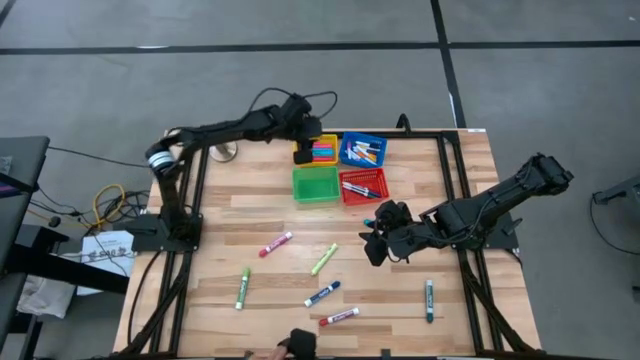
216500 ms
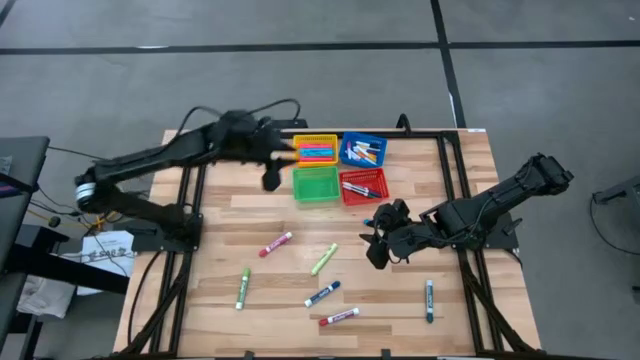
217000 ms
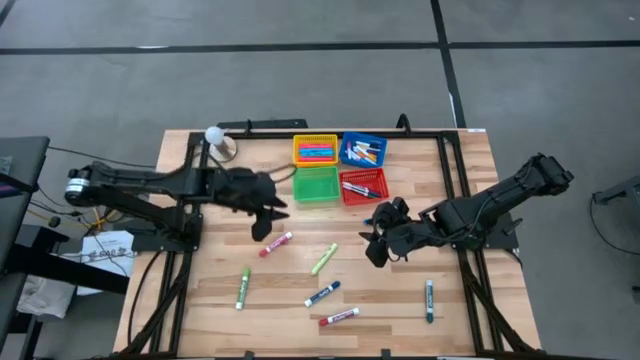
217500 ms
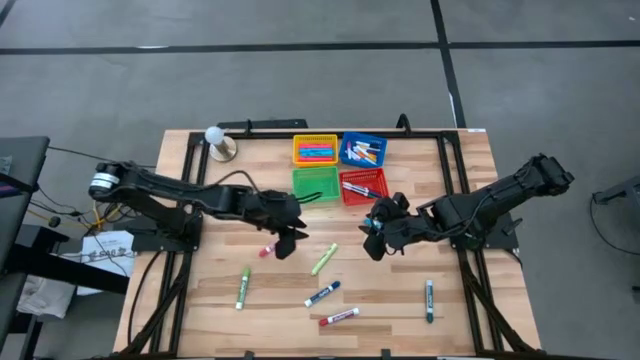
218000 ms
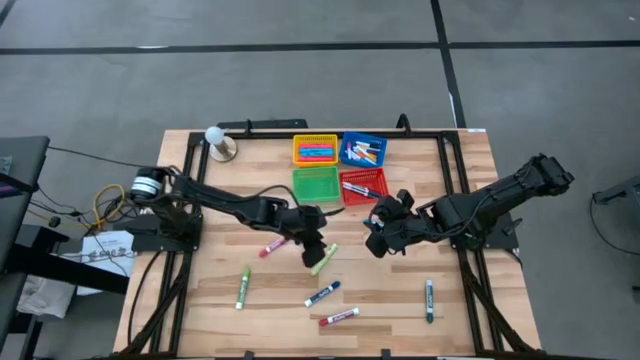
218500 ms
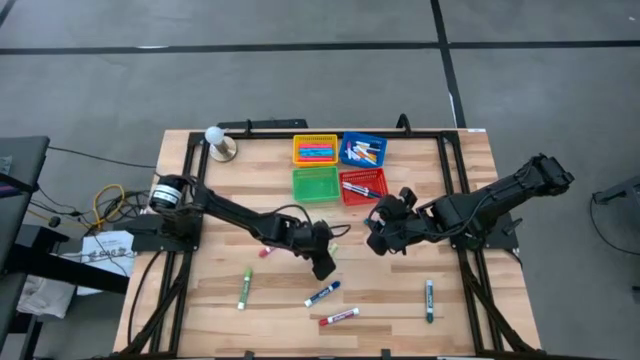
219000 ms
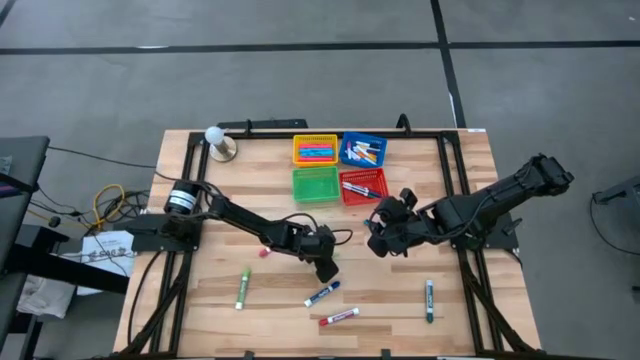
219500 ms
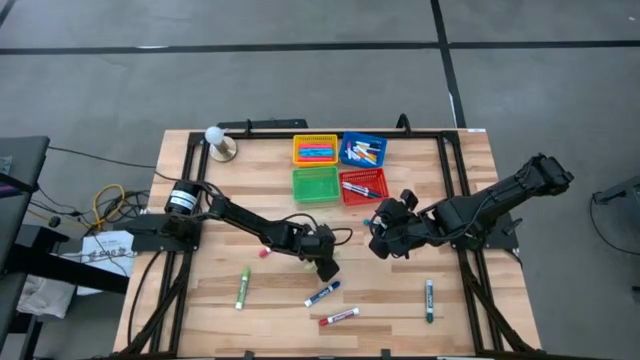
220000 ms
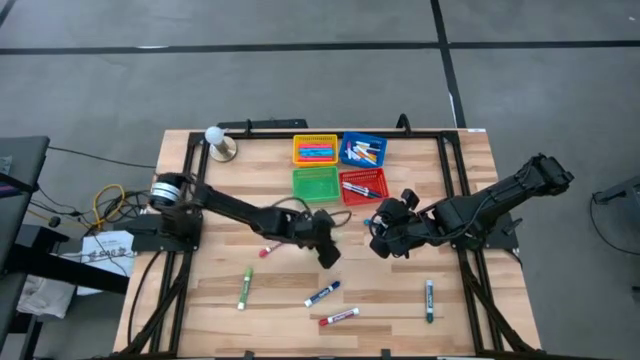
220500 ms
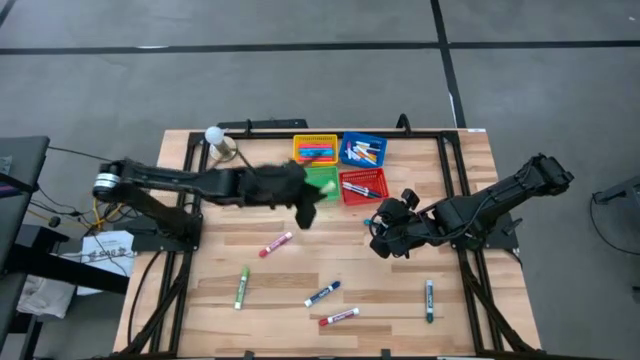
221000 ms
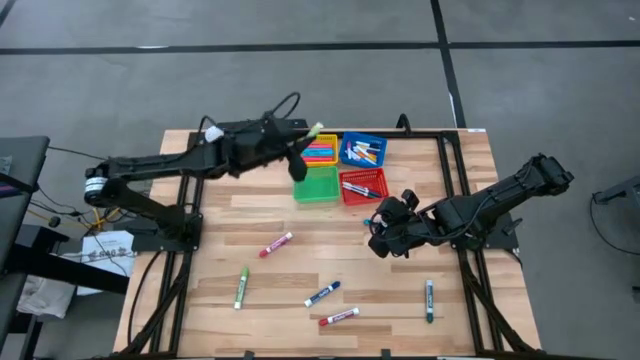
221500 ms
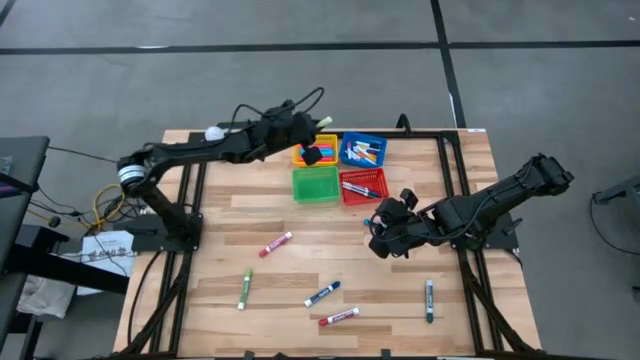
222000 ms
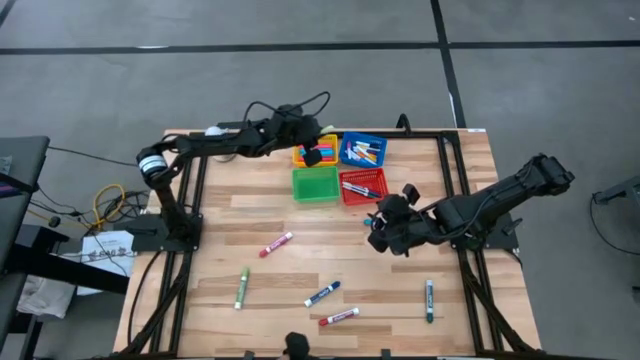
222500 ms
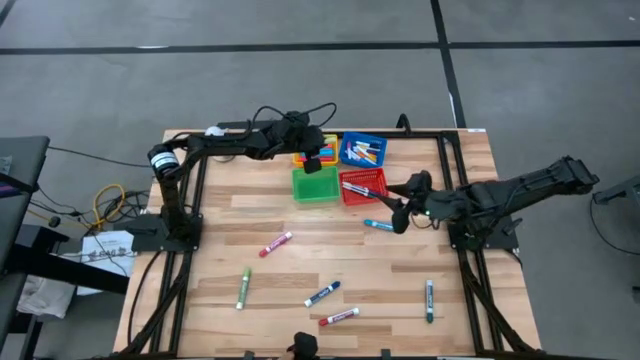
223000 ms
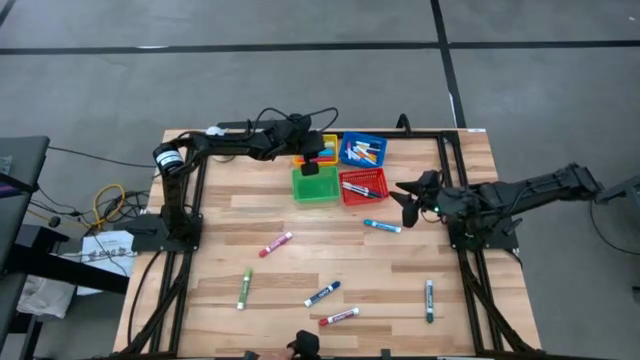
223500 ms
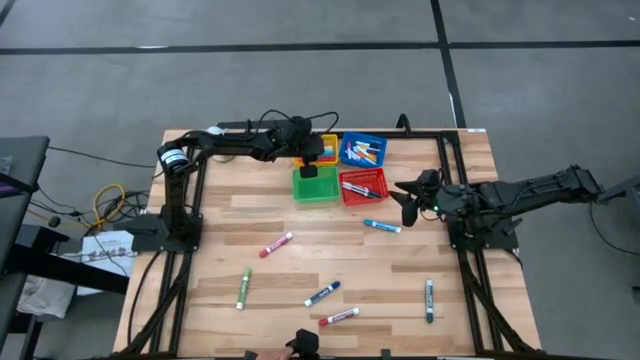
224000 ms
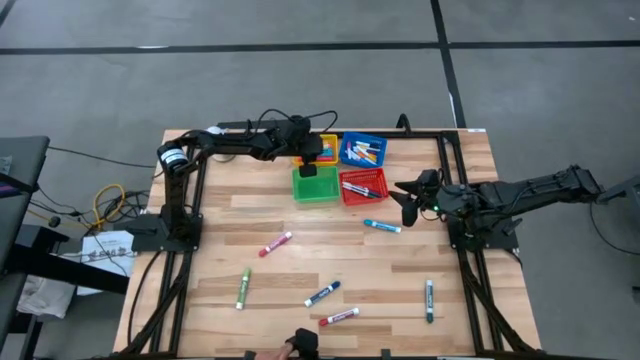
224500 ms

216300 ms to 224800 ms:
Task: Pick & Place Markers
Put the light green highlighter into the yellow bin

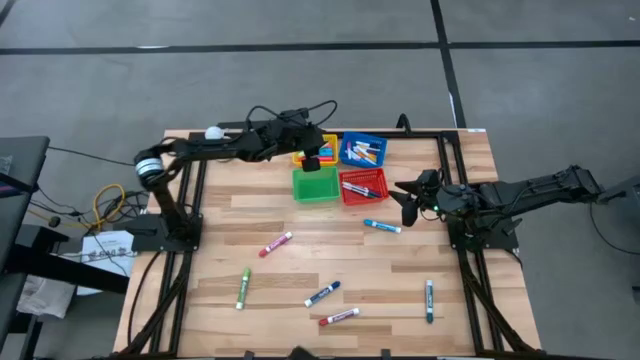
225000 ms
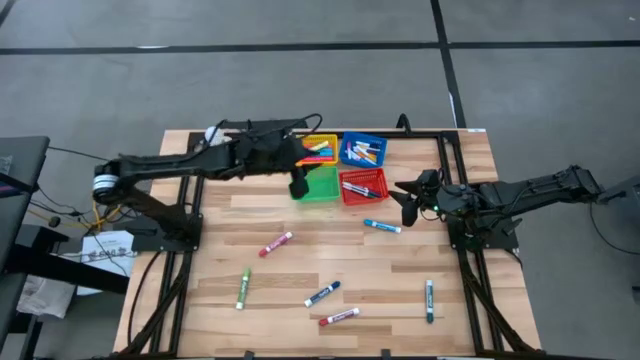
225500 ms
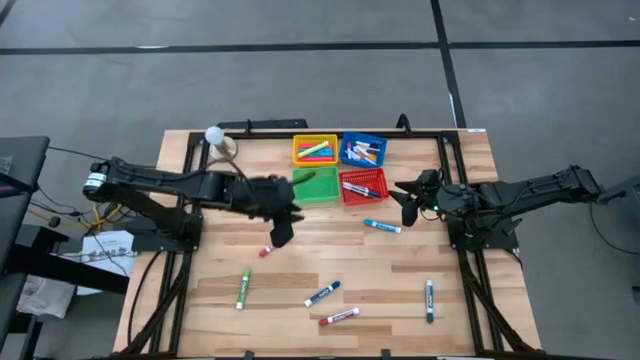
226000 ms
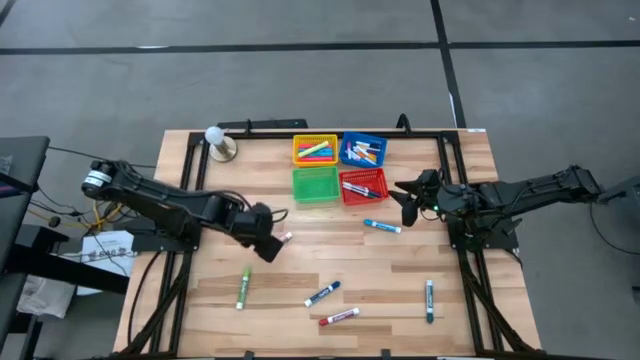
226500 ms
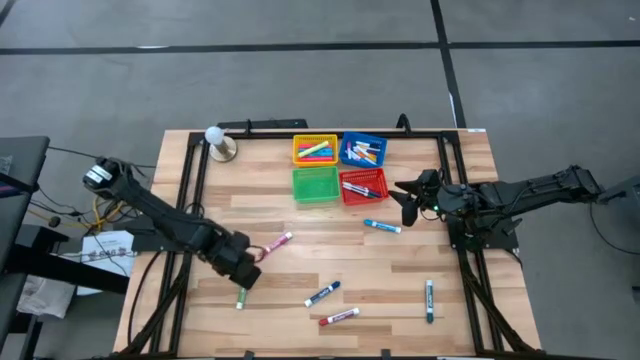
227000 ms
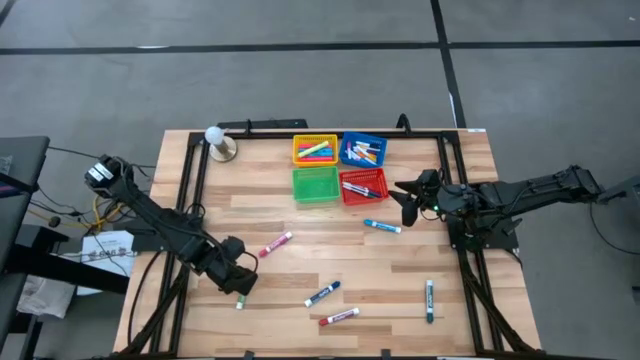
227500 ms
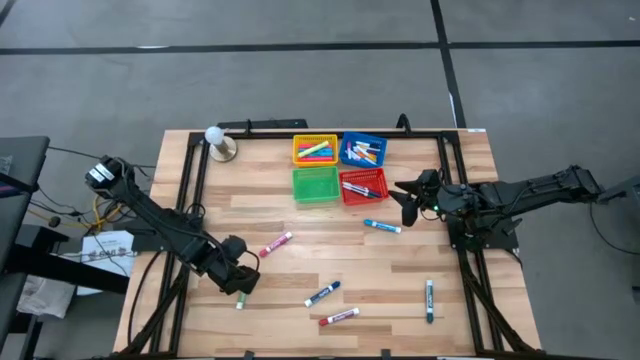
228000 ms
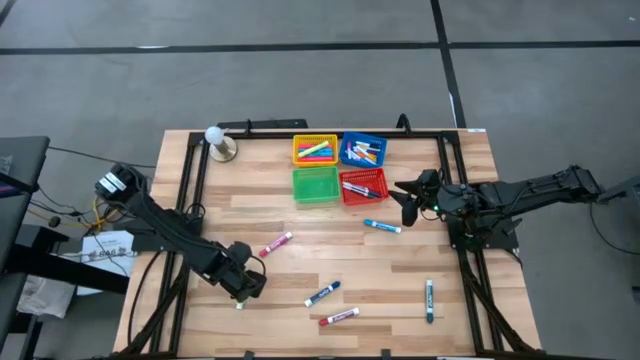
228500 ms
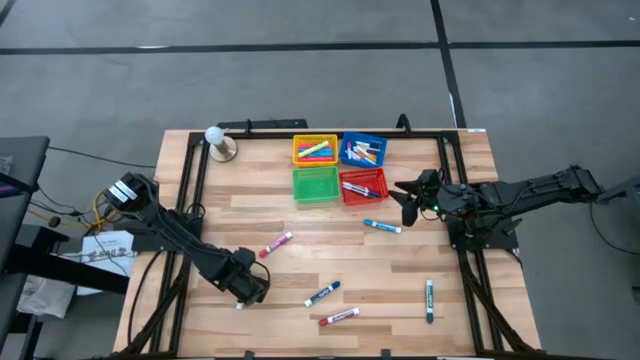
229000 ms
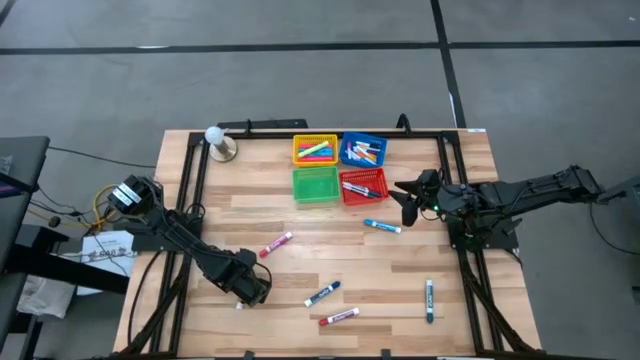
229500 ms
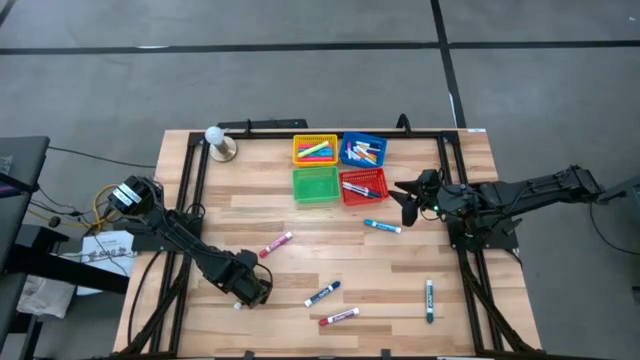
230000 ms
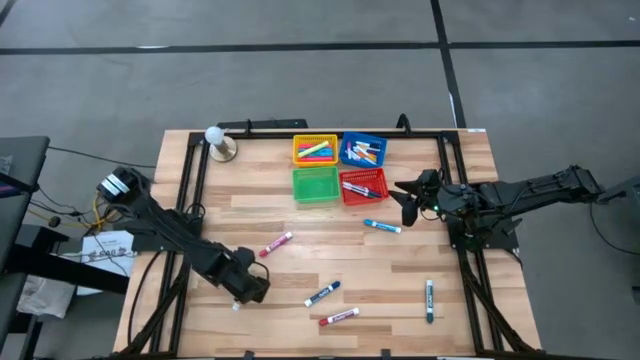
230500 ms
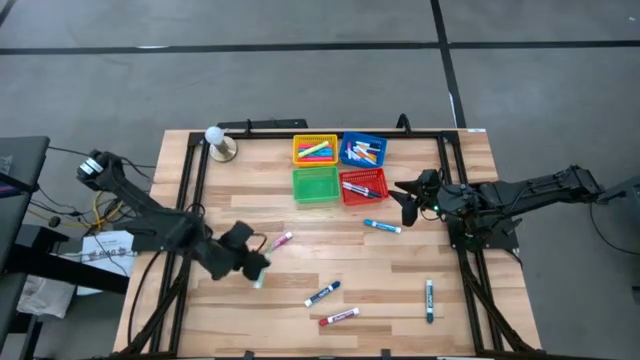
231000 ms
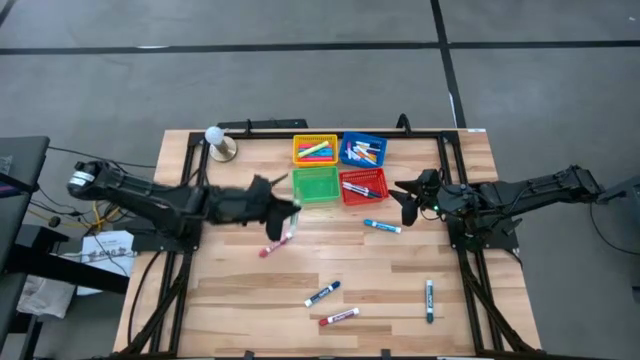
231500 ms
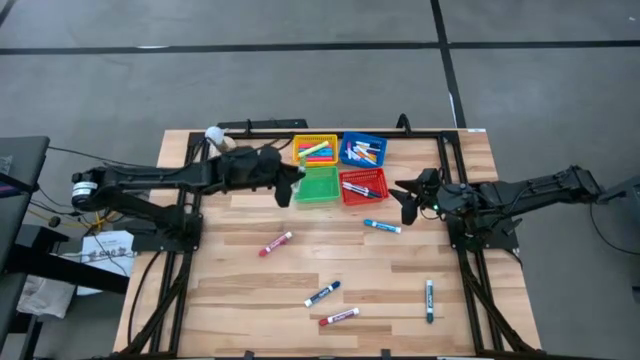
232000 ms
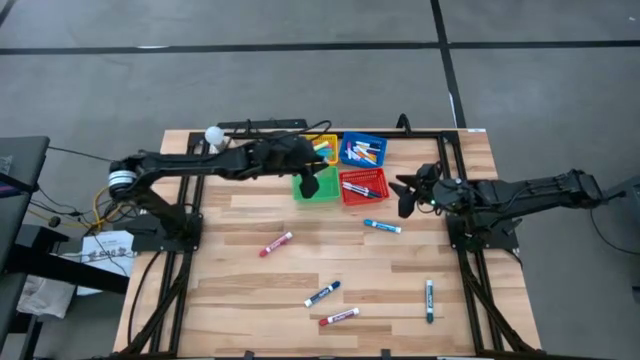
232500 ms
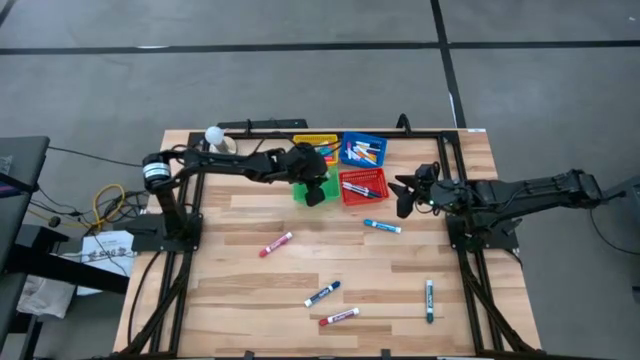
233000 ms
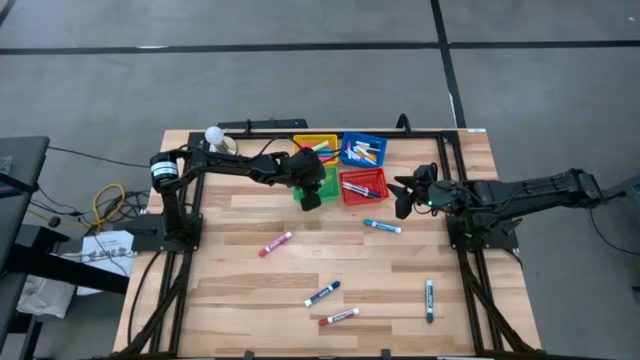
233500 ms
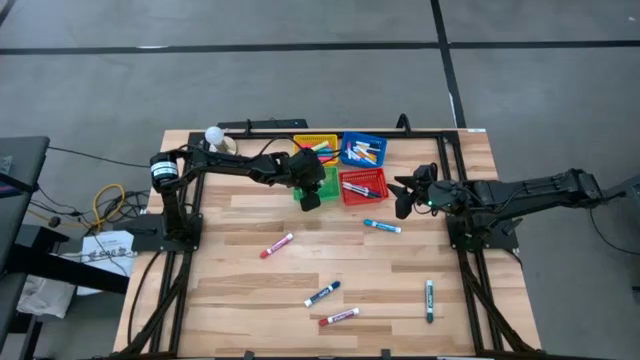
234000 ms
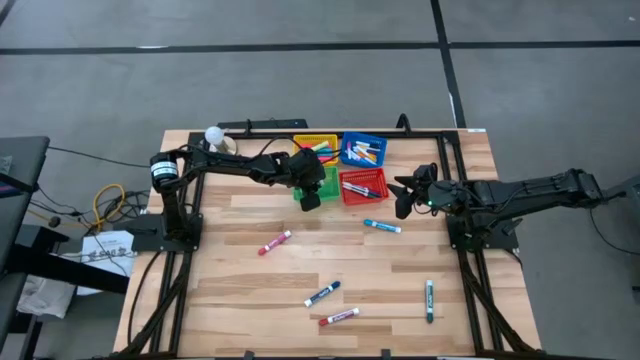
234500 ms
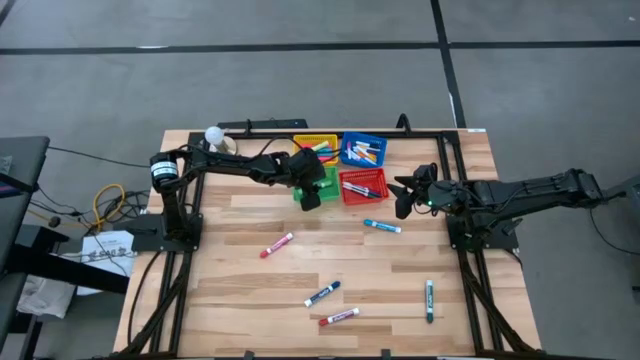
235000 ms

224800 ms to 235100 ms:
Put the light green dry erase marker into the green bin

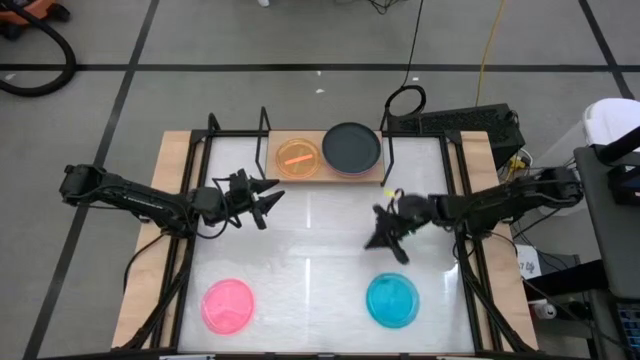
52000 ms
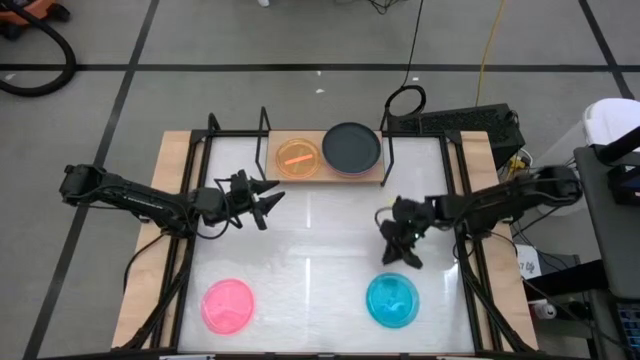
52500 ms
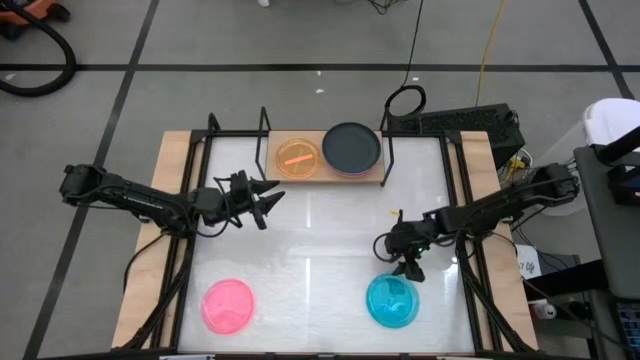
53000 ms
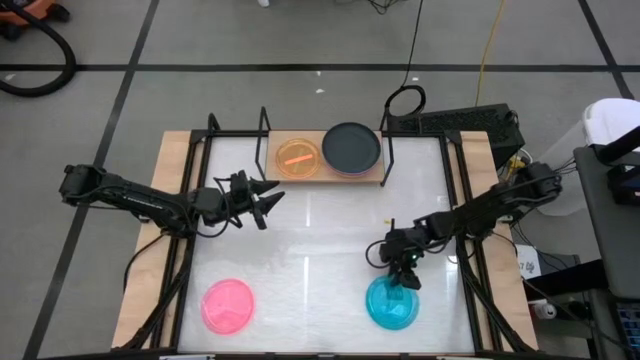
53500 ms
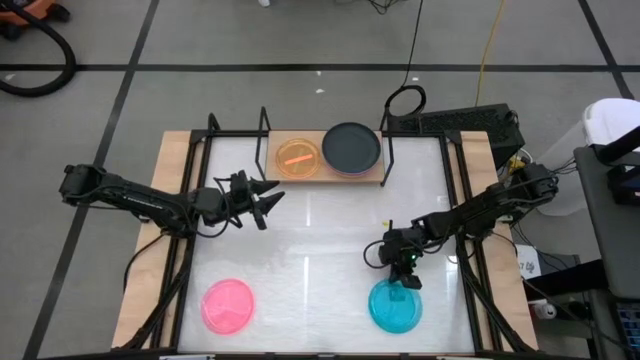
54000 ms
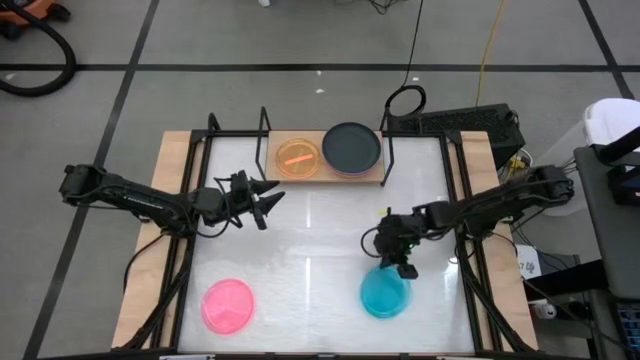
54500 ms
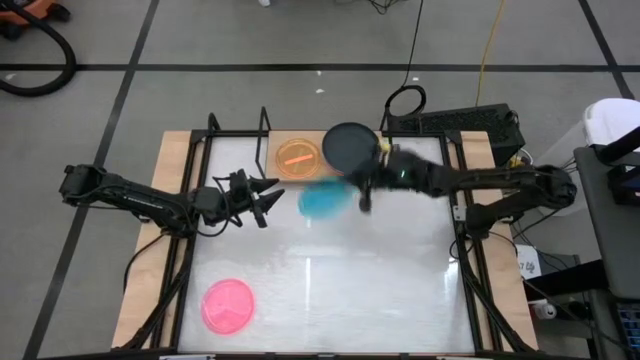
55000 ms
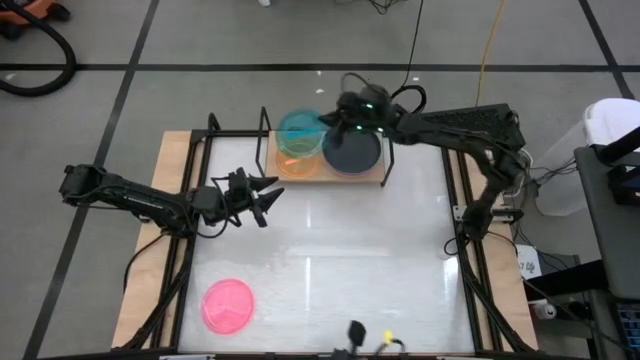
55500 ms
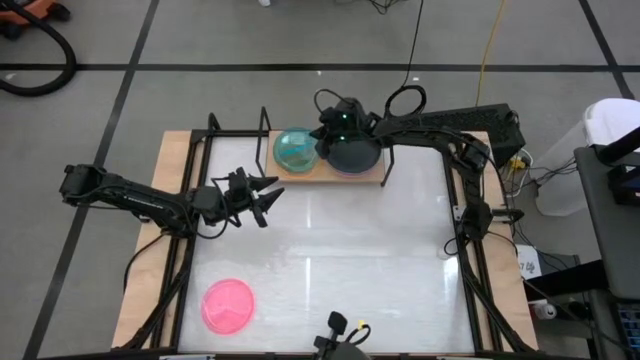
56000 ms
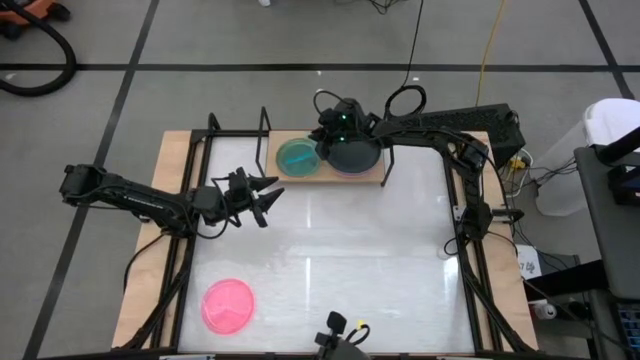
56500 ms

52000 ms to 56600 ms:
Task: Place and stack plates onto a shelf
Stack the light blue plate on top of the light orange plate on the shelf
